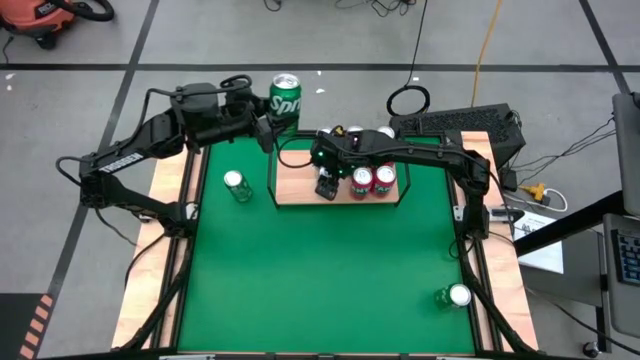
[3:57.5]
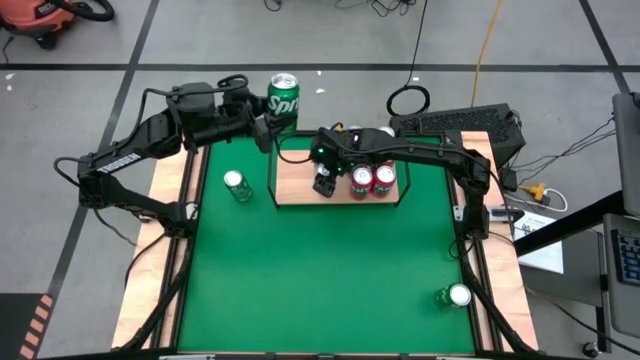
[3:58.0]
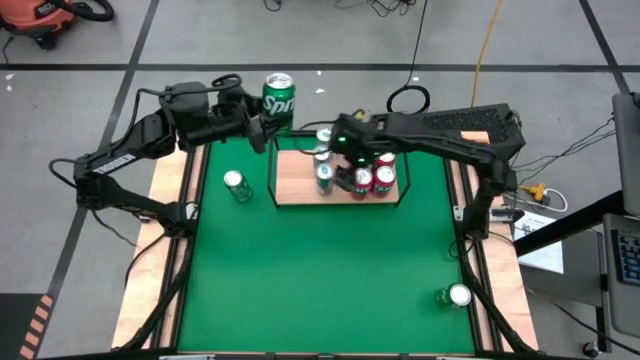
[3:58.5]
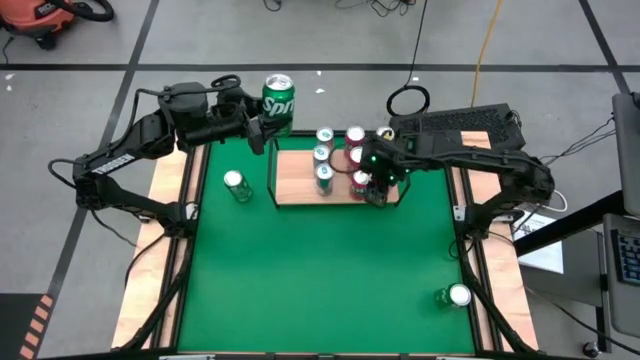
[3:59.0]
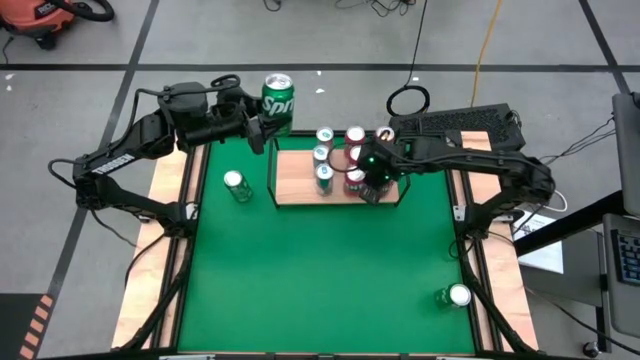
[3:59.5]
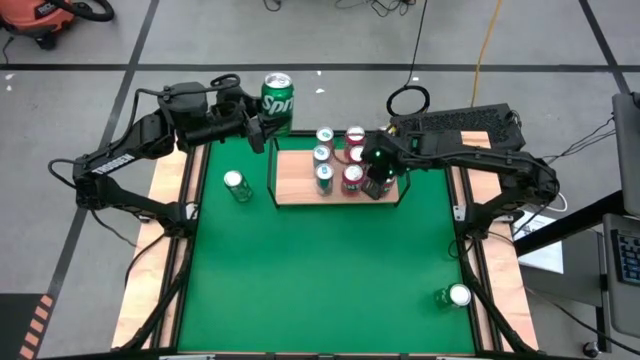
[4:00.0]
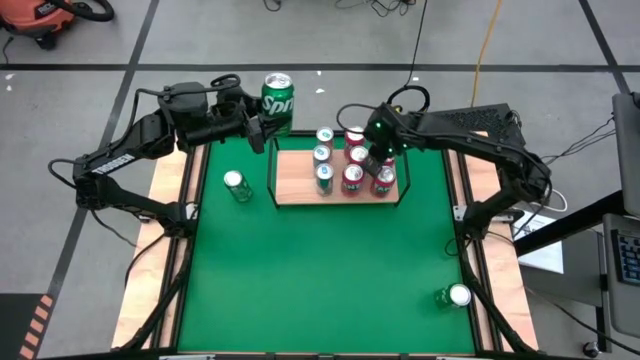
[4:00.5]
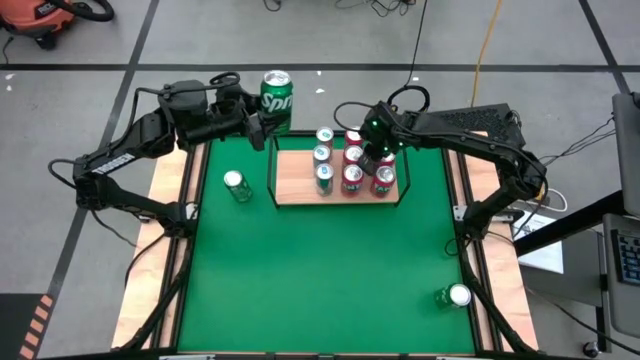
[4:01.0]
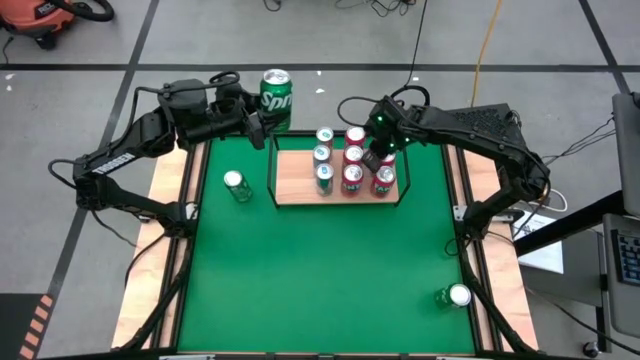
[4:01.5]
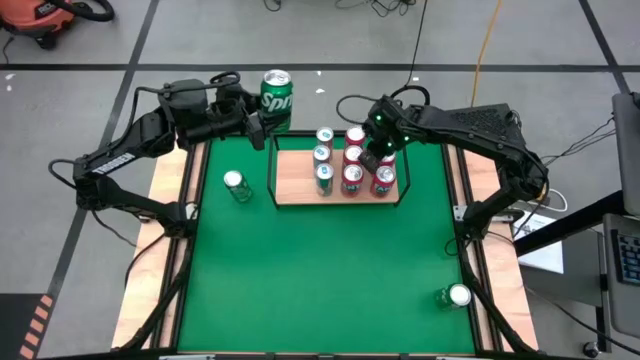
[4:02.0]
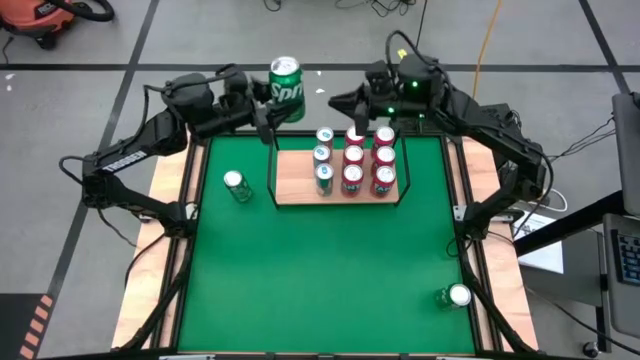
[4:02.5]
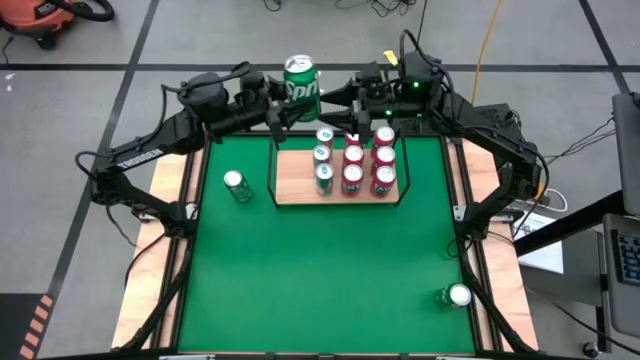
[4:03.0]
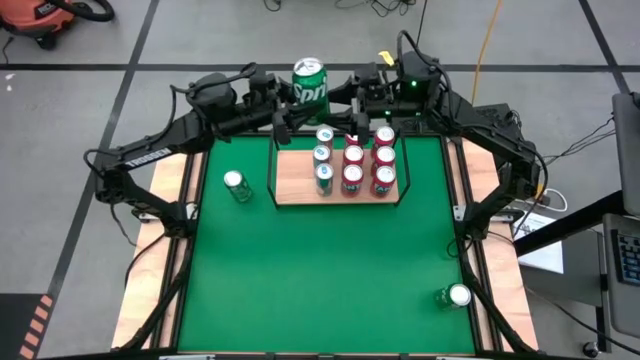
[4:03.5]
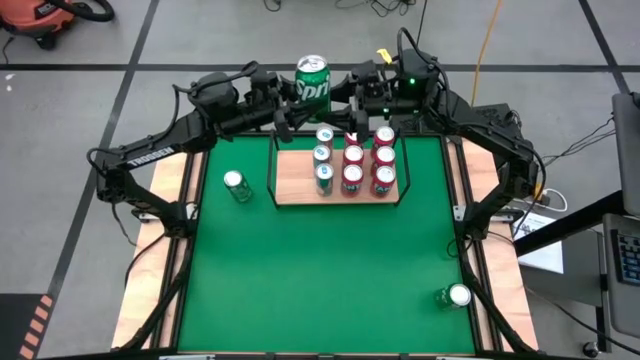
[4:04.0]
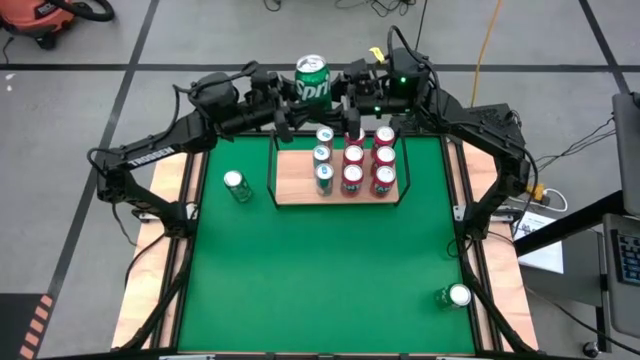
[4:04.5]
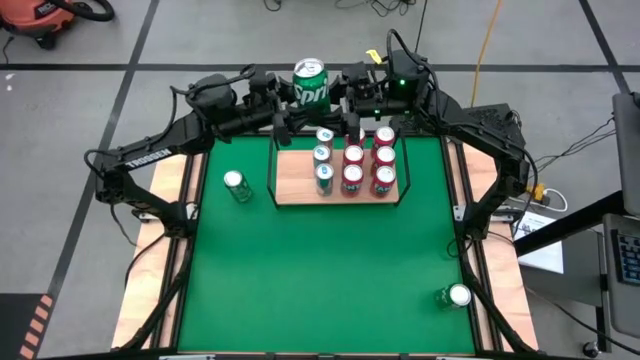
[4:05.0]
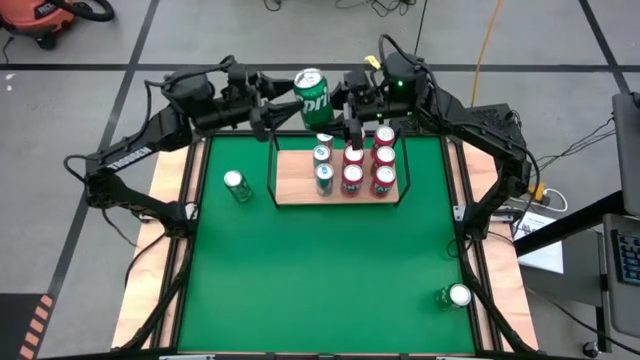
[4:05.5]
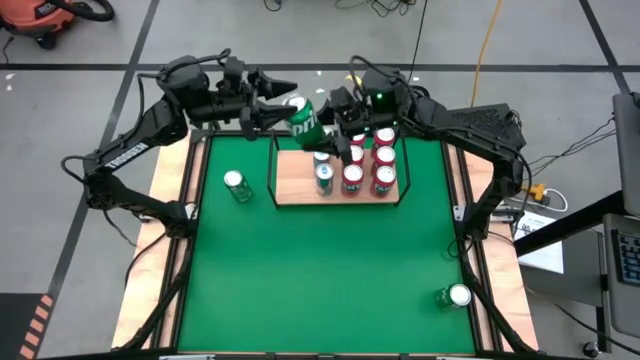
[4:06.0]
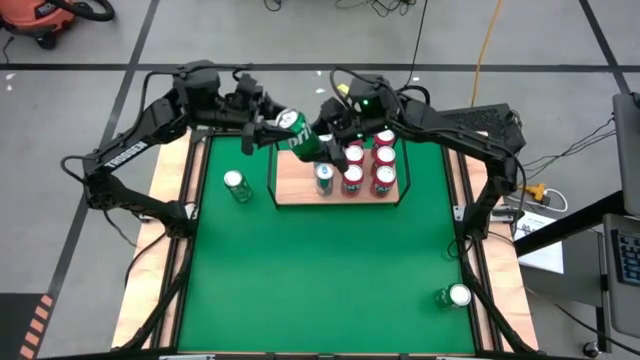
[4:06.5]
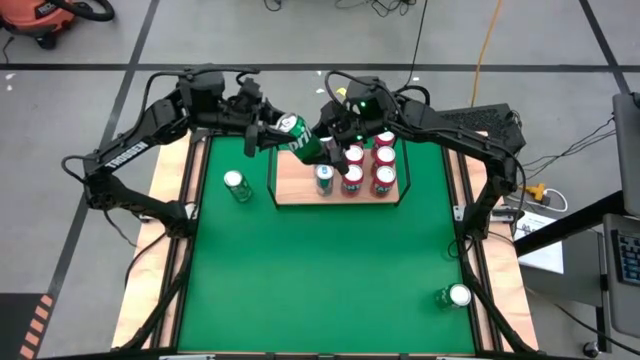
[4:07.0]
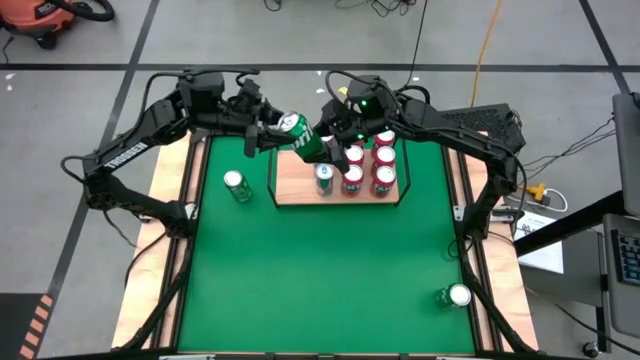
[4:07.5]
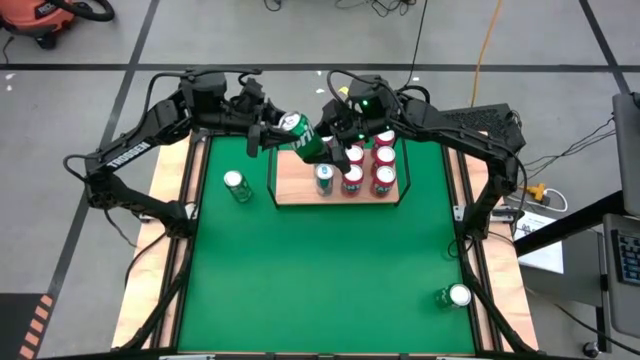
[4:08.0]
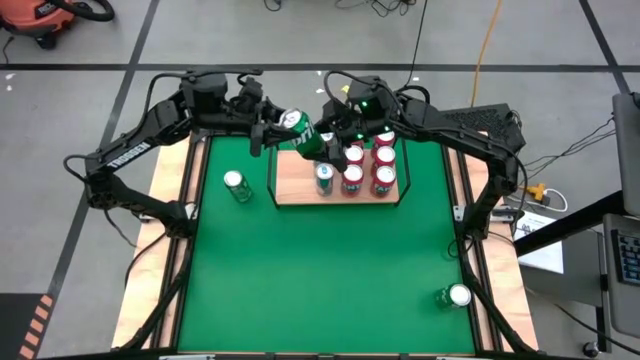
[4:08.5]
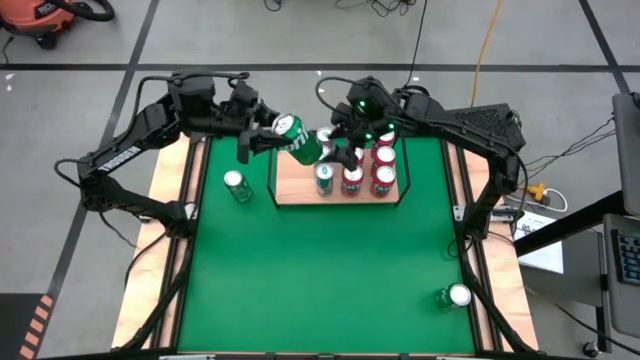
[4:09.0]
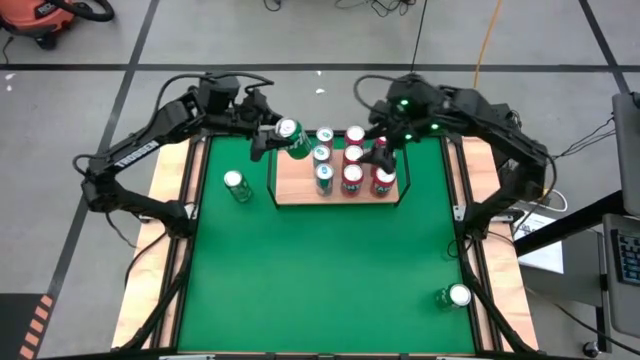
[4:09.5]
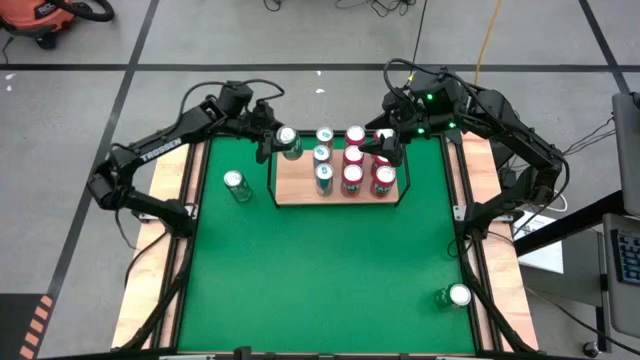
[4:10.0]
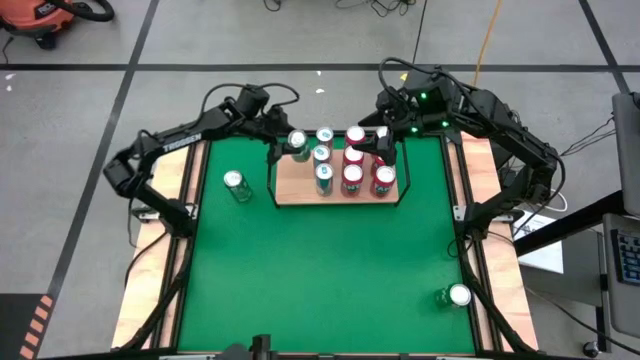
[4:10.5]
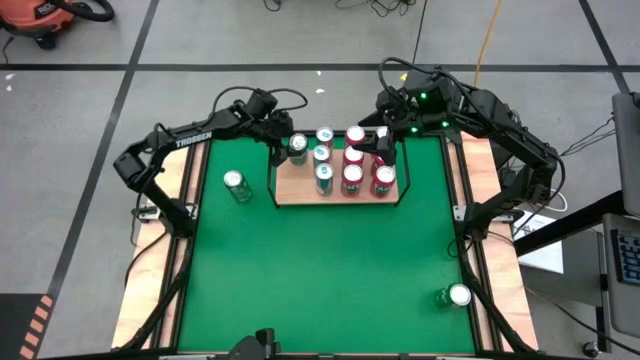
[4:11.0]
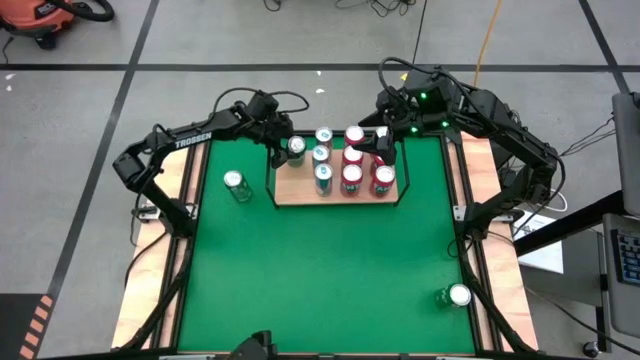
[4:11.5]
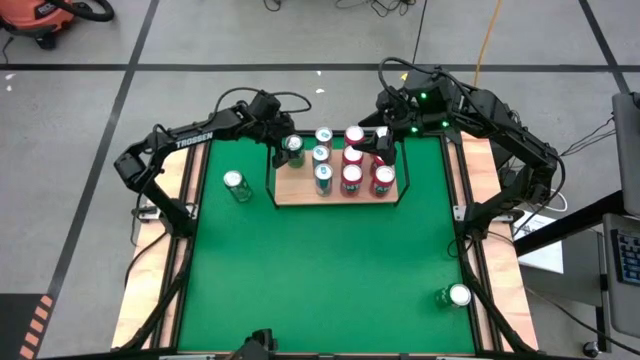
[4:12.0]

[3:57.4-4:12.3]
Task: Place canned beverage on shelf
Put the green soda can on the shelf

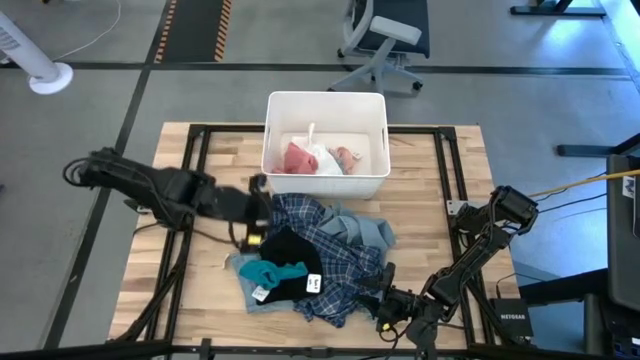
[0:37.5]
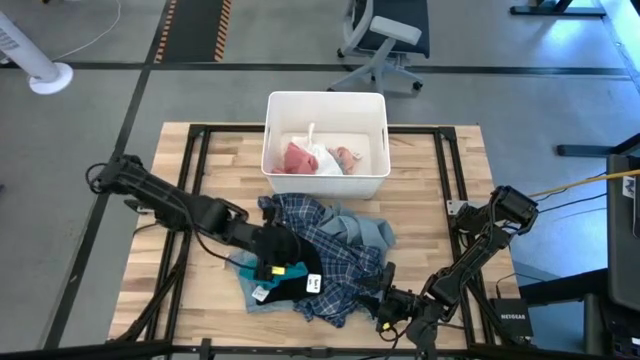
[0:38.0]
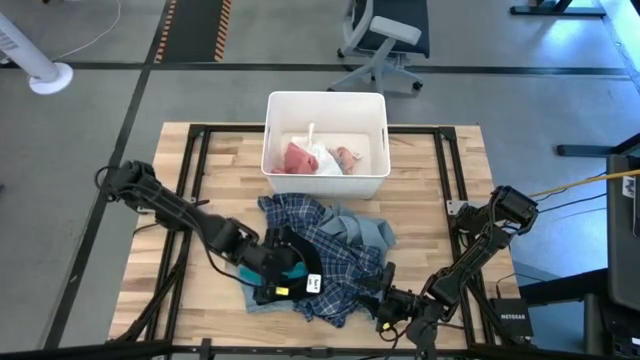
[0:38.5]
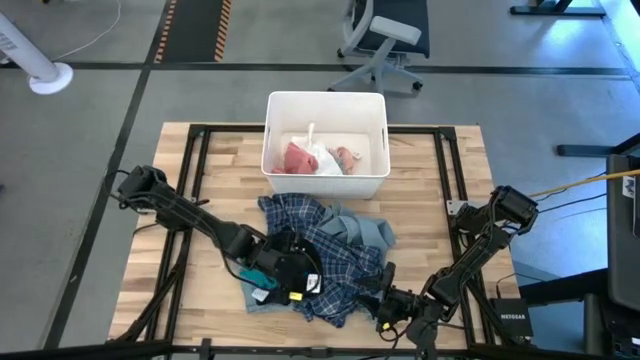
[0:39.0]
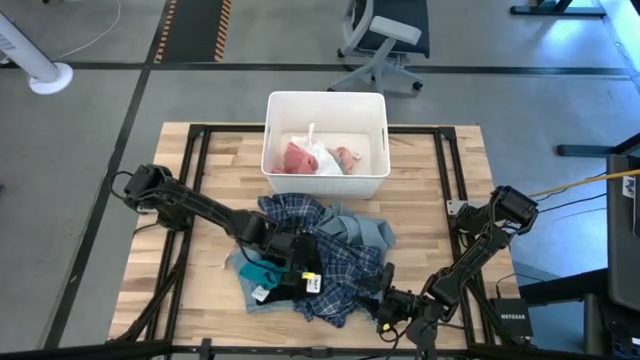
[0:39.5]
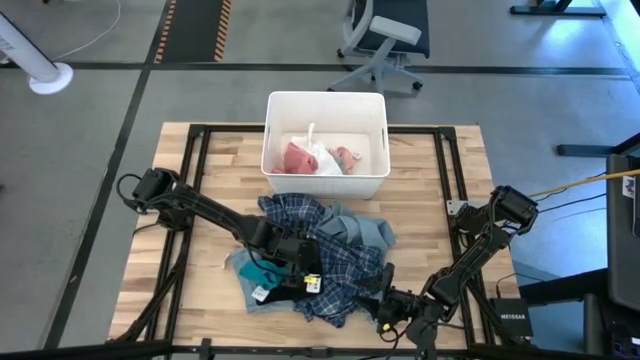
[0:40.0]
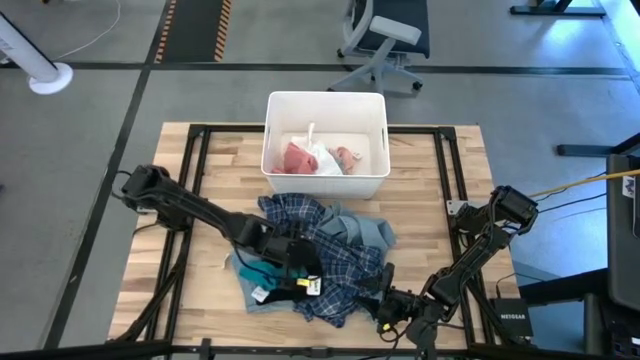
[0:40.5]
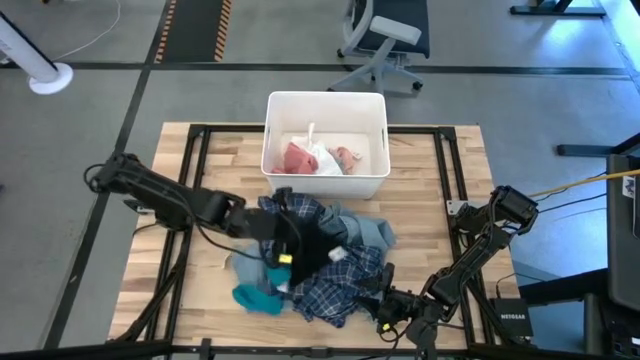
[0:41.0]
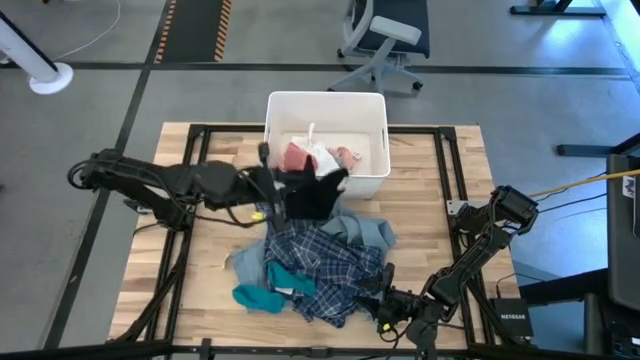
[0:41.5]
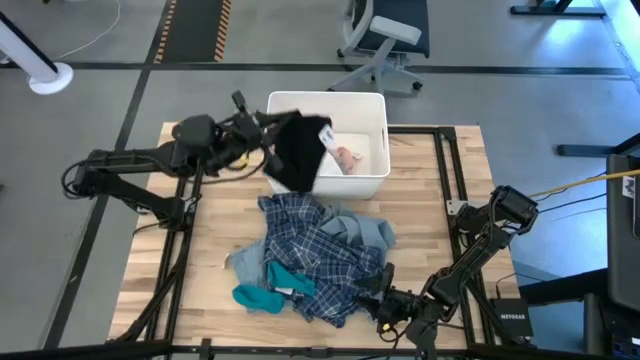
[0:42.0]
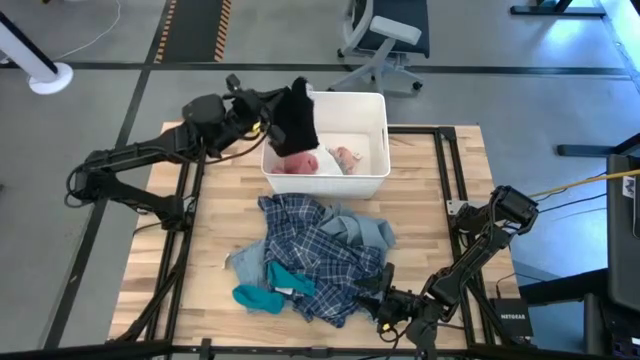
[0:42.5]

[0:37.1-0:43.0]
Task: Sort clothes
Put the black pants into the white laundry bin
